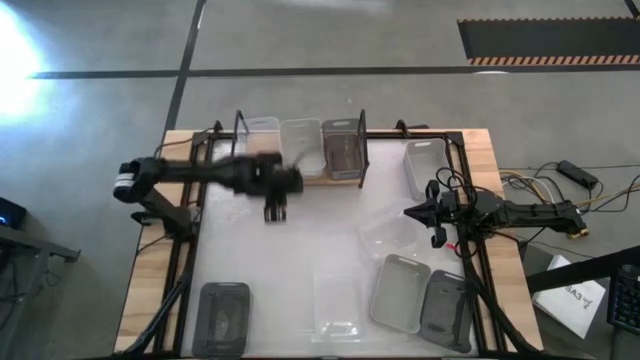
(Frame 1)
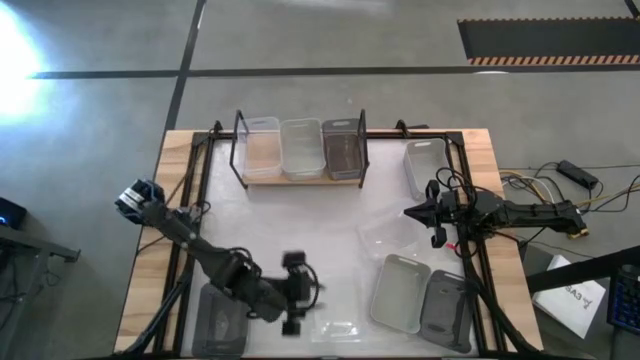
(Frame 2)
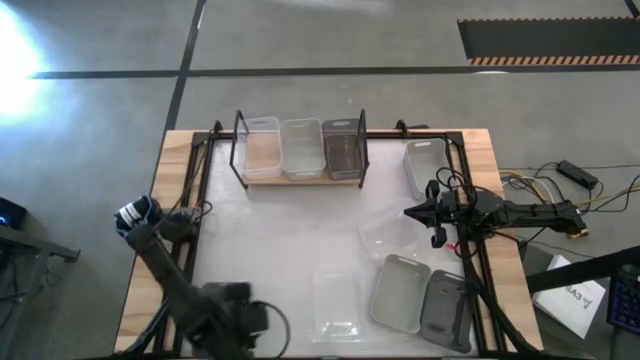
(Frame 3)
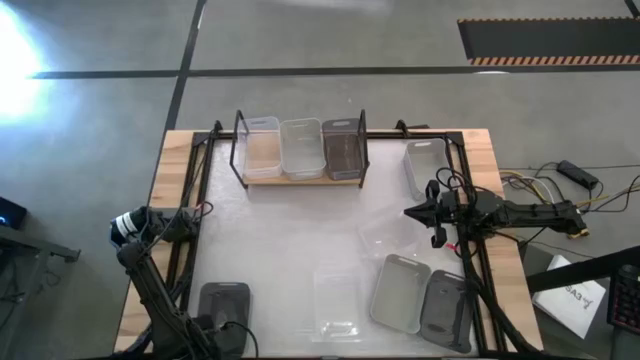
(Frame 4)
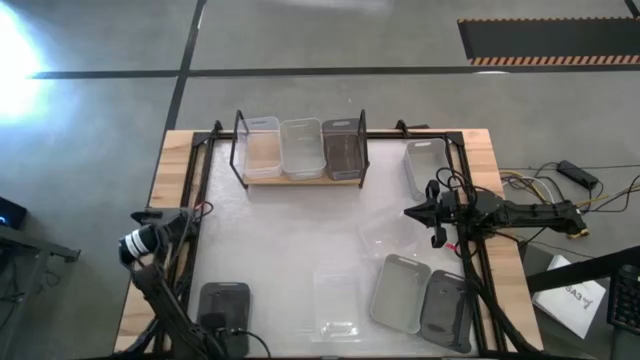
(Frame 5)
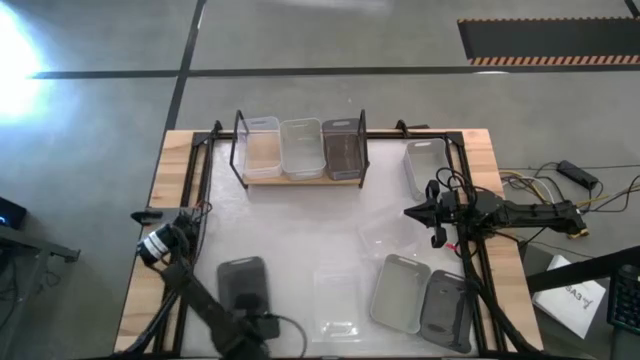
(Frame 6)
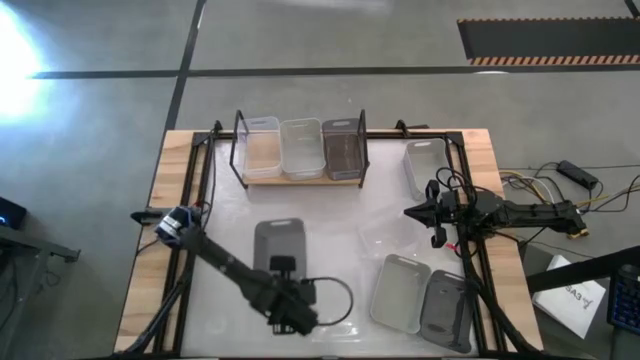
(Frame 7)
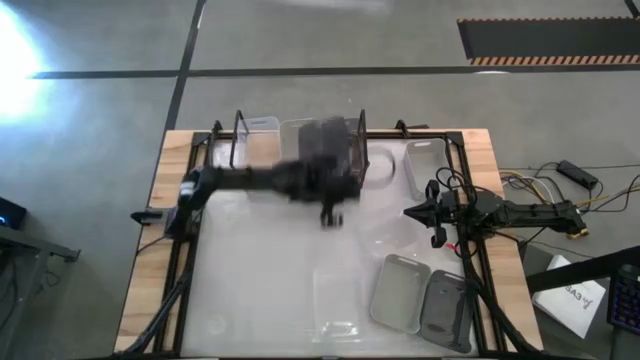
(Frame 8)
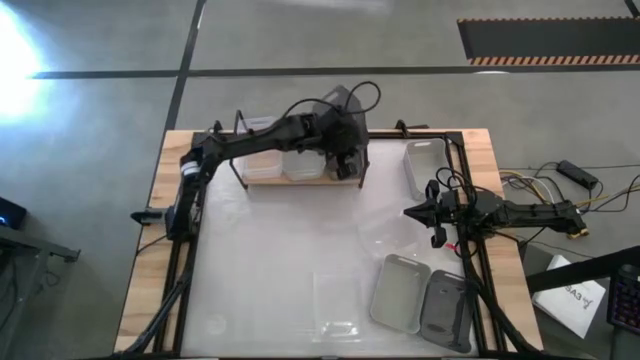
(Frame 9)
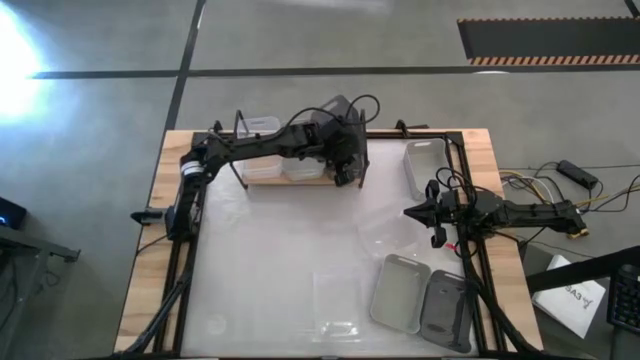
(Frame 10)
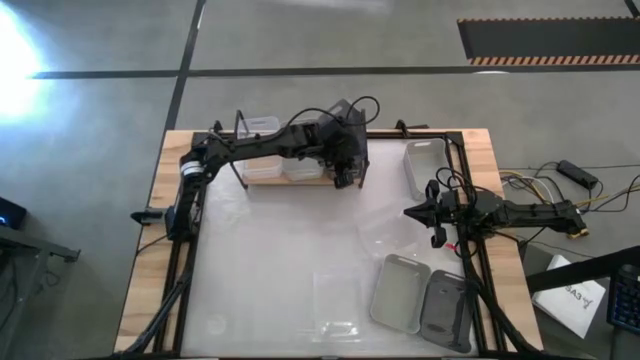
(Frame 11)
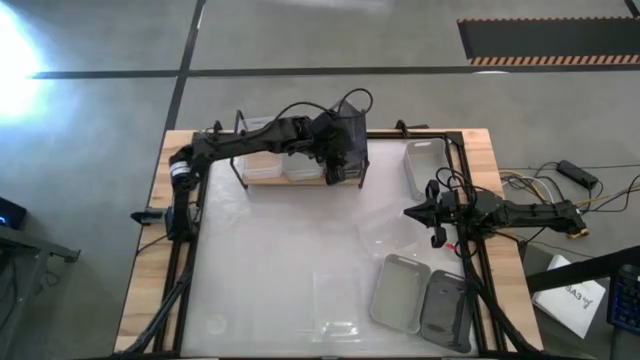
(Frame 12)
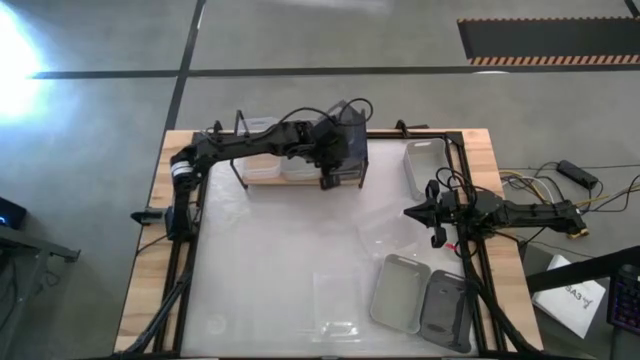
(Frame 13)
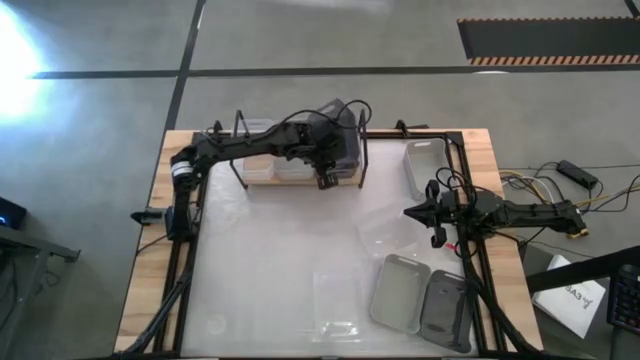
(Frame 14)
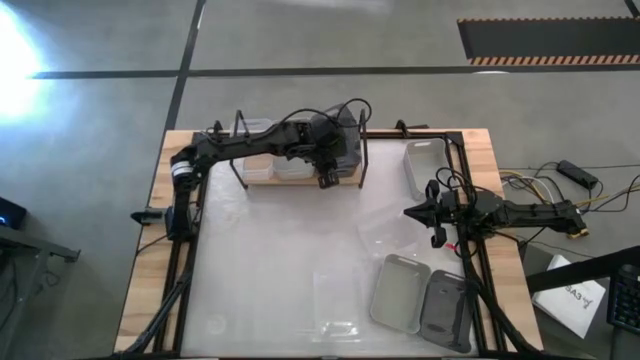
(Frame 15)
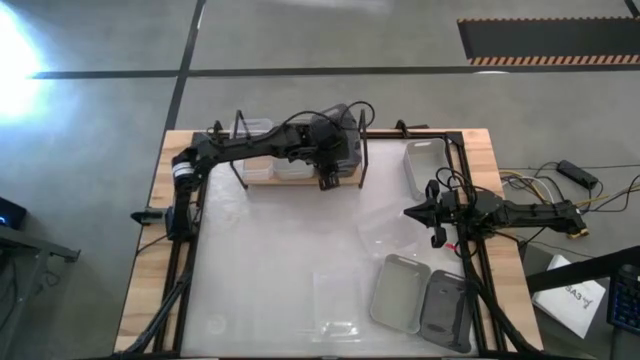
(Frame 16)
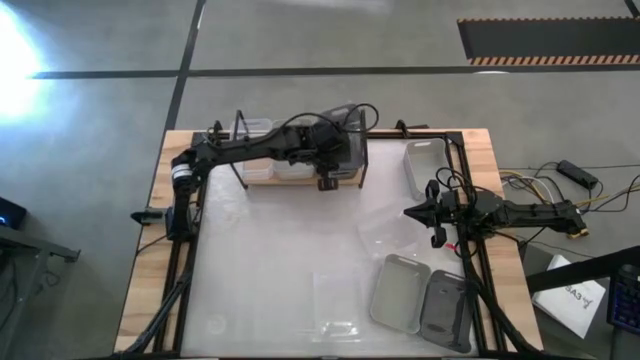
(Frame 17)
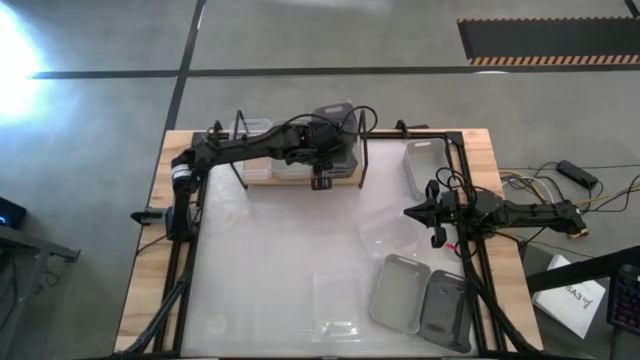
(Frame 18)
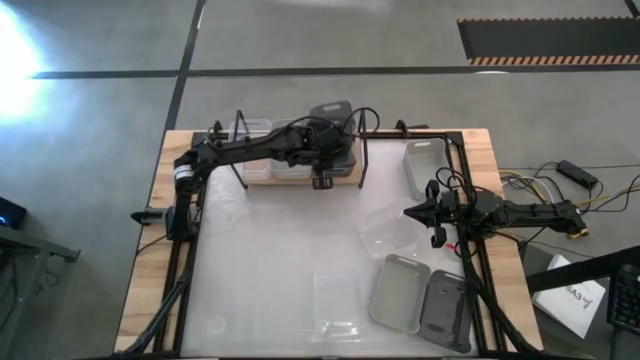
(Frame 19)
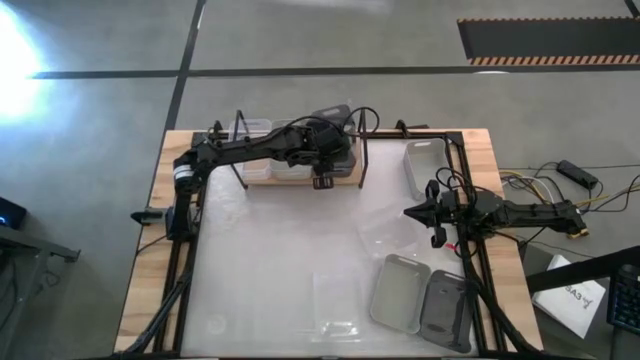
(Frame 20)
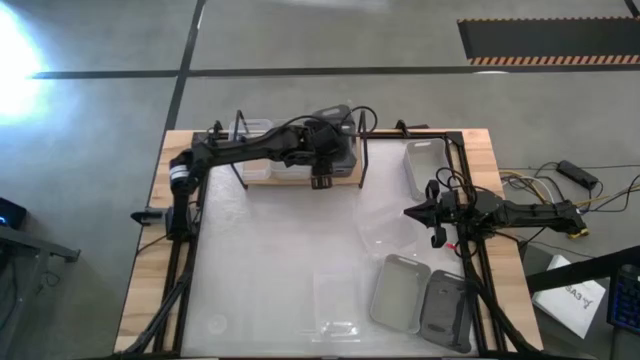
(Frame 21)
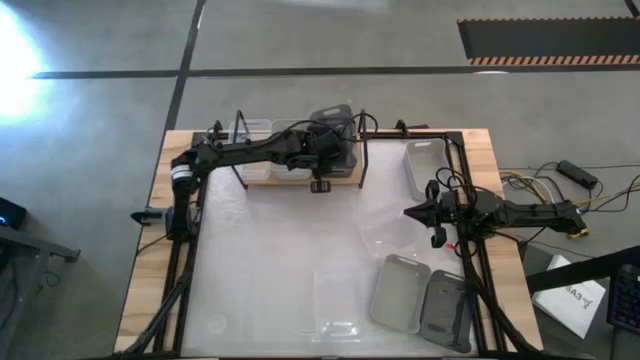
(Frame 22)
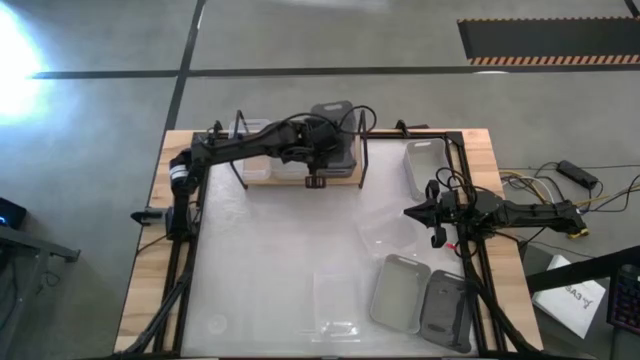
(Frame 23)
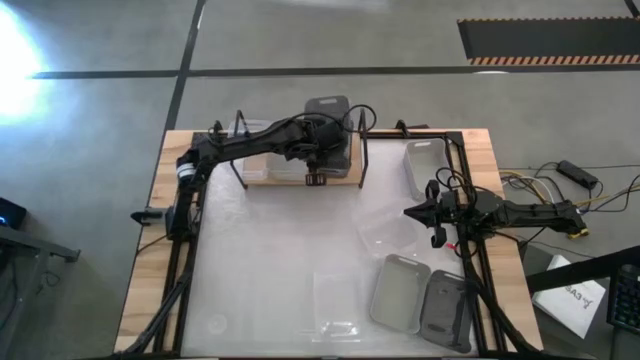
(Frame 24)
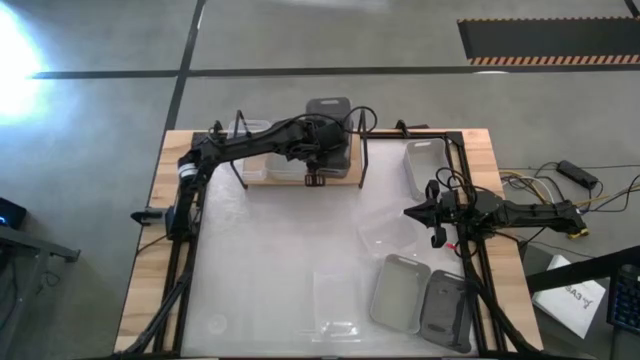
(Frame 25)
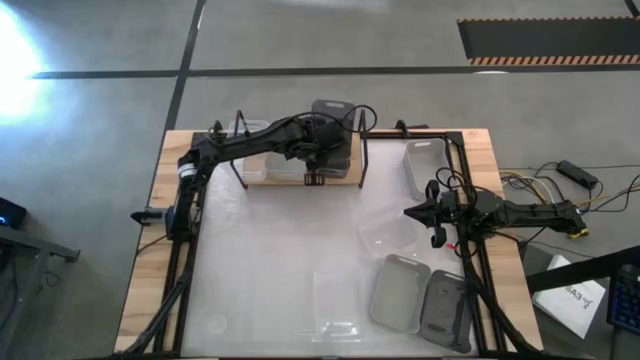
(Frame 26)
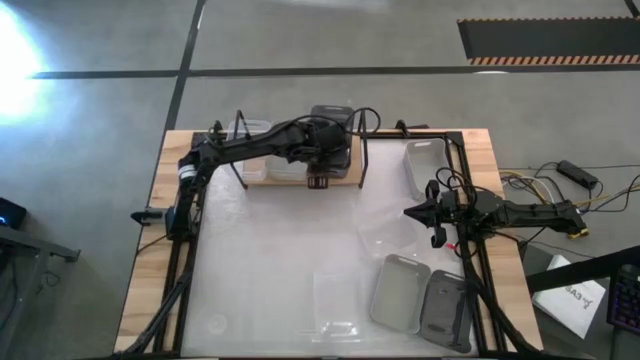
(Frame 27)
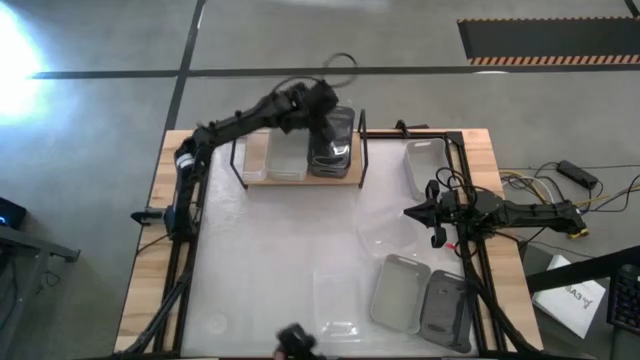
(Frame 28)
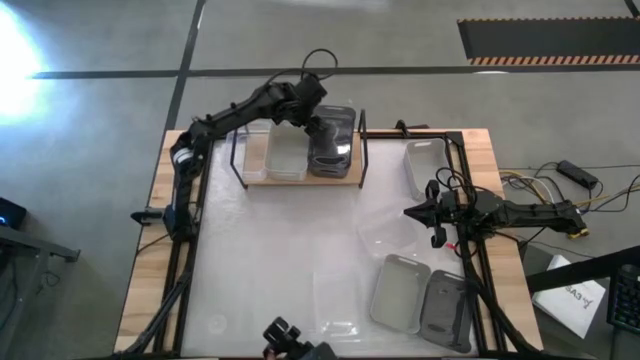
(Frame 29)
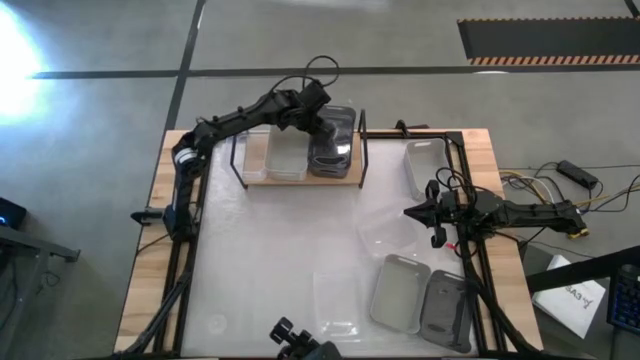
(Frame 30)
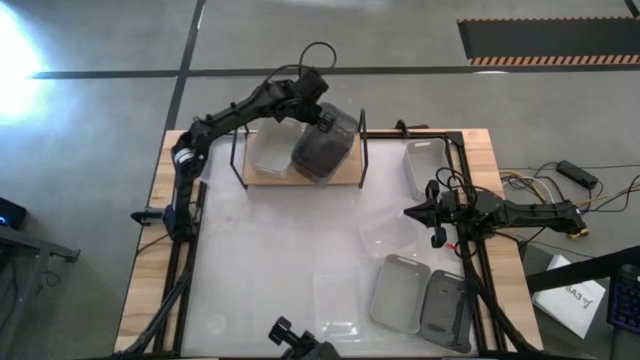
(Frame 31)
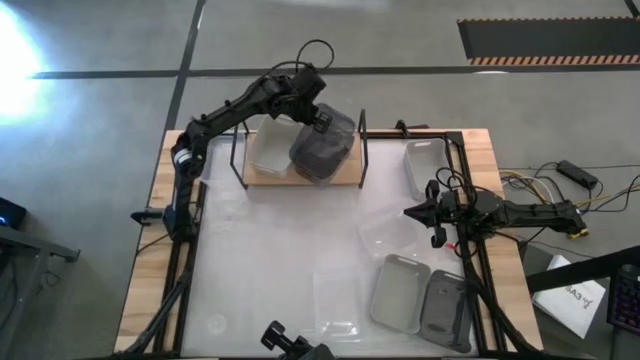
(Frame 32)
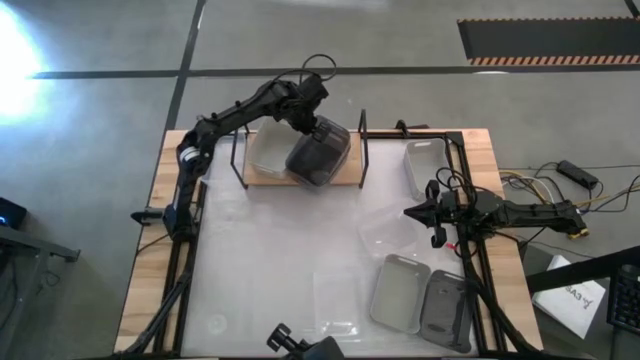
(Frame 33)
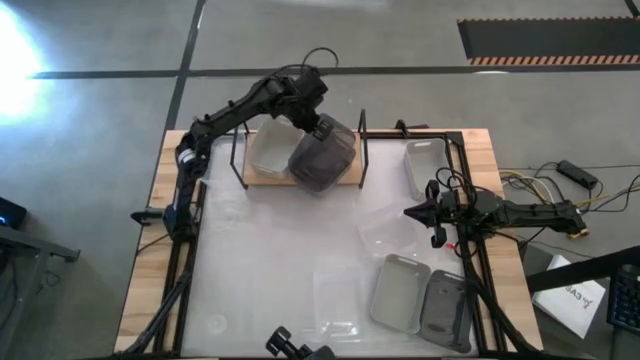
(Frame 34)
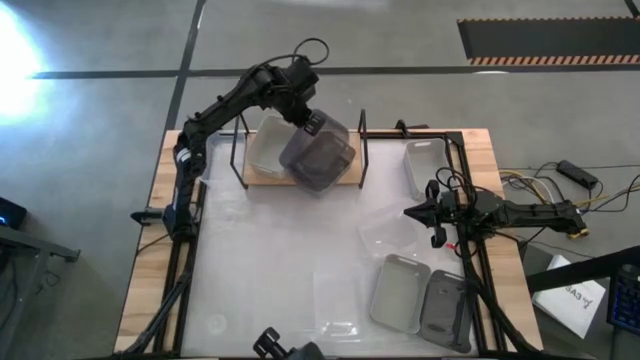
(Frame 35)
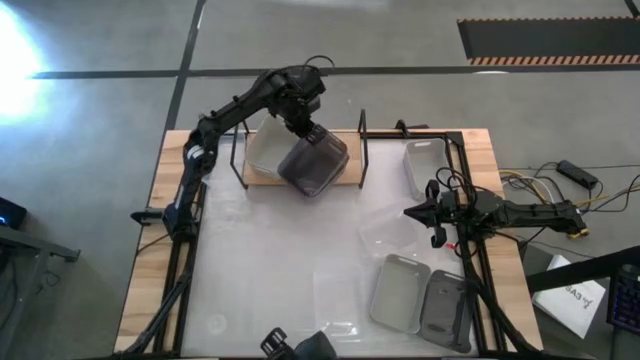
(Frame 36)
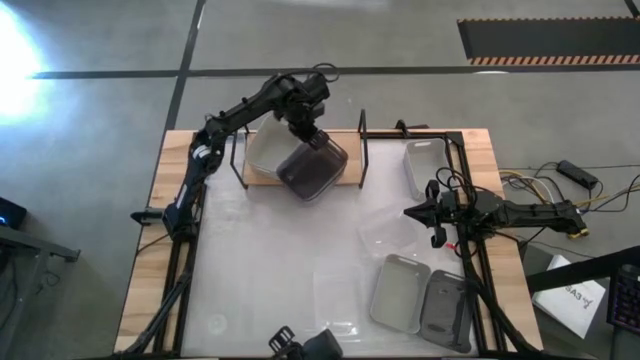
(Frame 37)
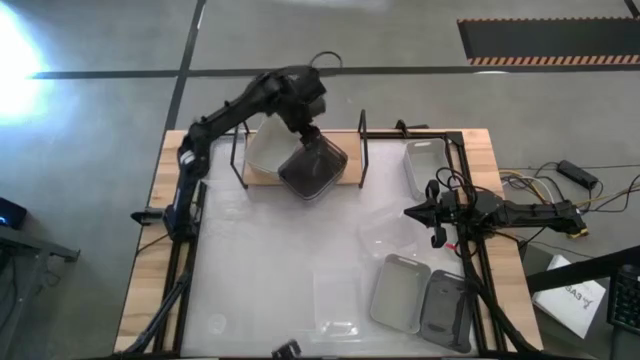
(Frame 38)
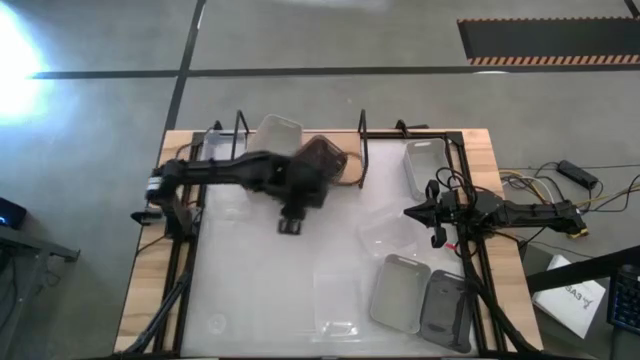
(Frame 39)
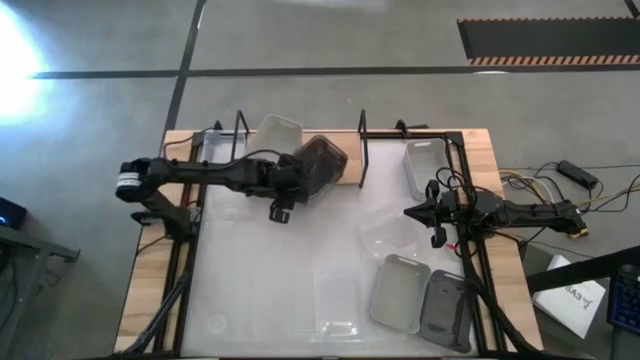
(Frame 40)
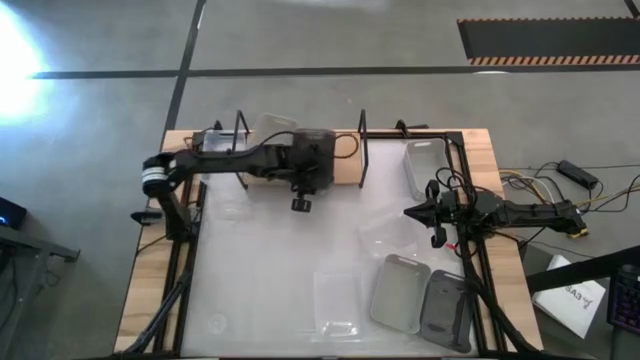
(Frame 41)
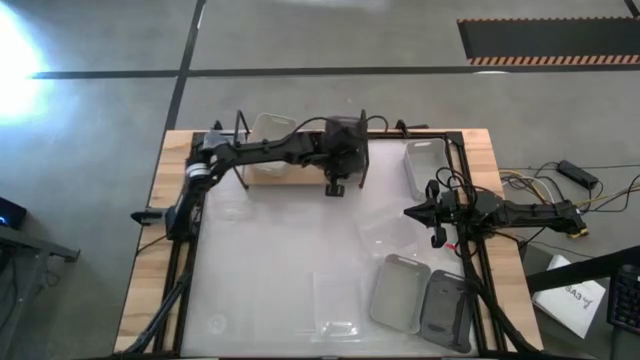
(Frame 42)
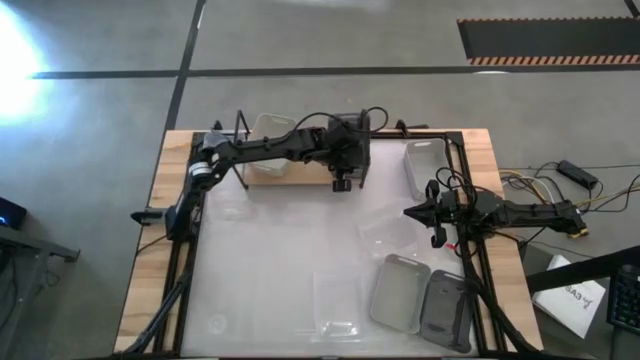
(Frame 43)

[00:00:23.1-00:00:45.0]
Task: Stack baskets on shelf by color
Stack the left black bin on top of the black bin on the shelf

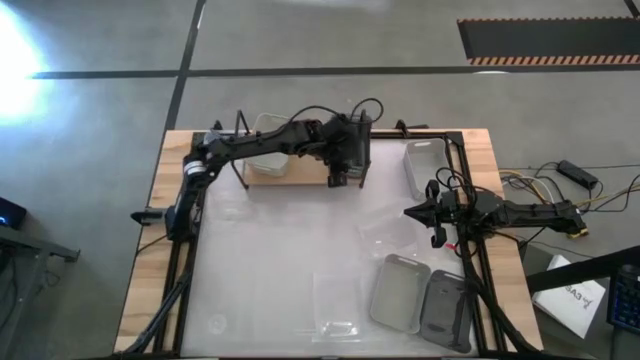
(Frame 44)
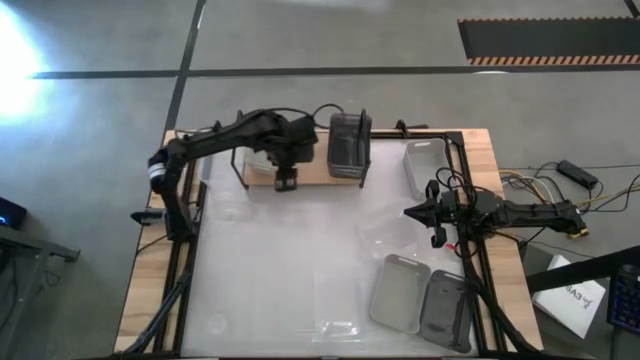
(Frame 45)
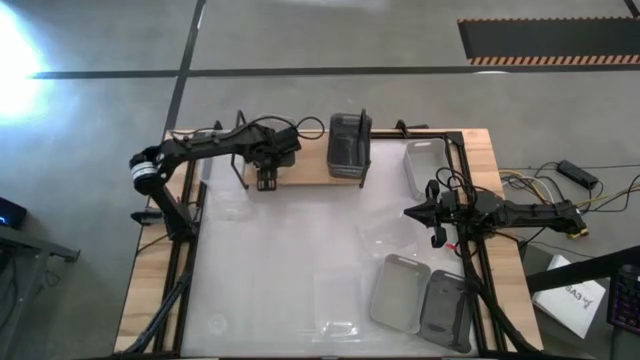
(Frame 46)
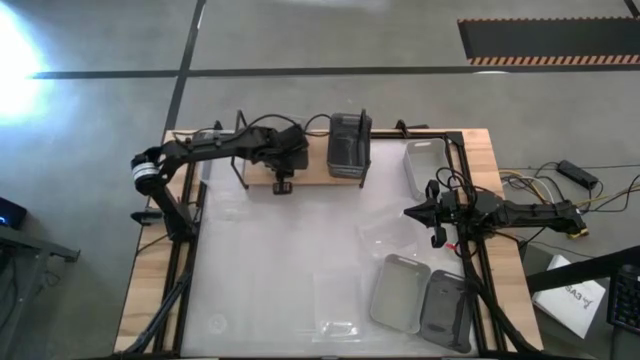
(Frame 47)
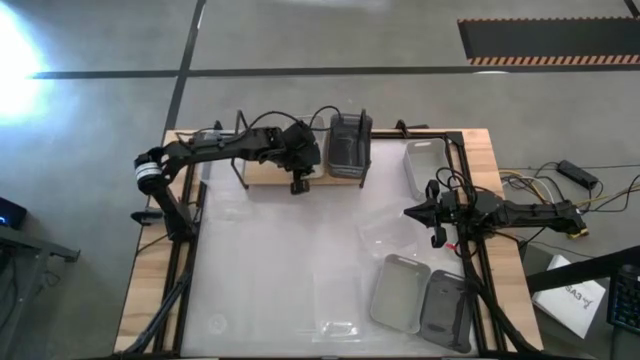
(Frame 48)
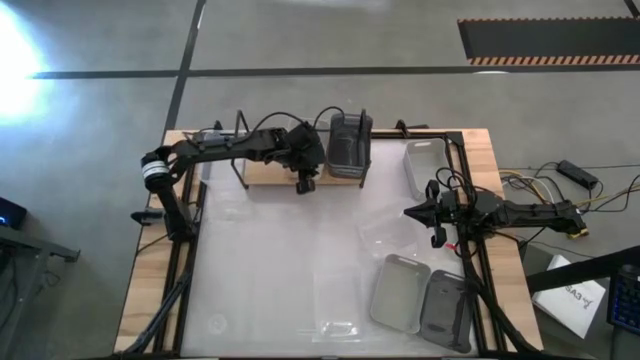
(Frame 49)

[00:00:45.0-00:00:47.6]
Adjust the gray bin on the shelf
